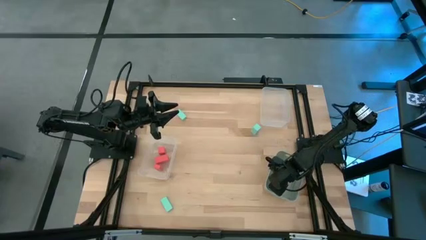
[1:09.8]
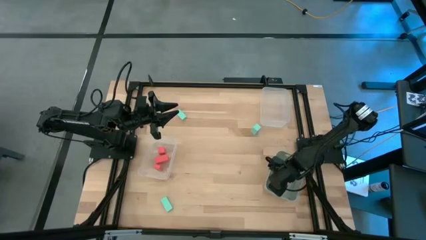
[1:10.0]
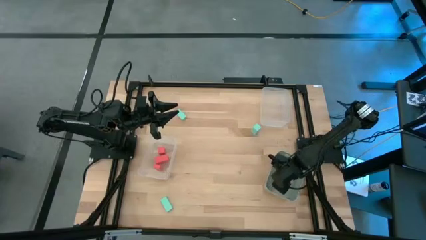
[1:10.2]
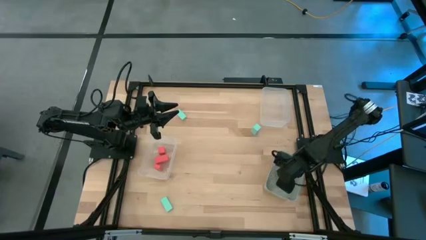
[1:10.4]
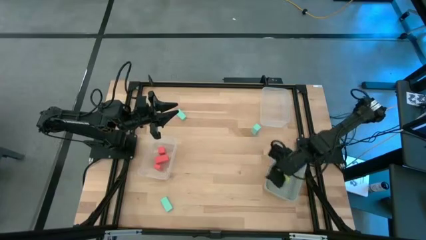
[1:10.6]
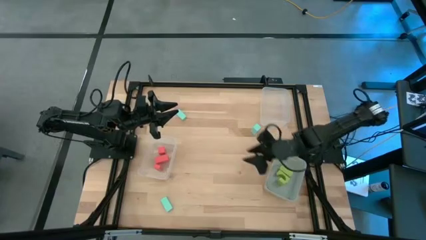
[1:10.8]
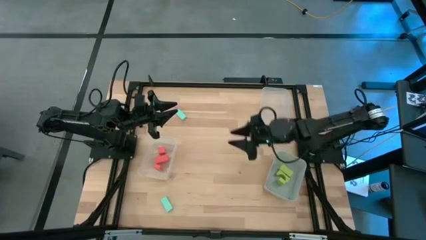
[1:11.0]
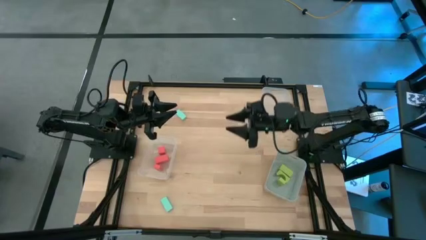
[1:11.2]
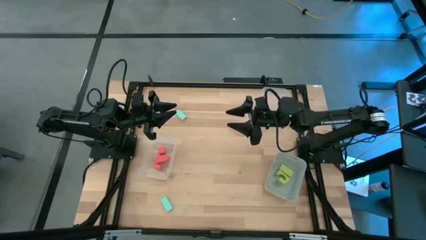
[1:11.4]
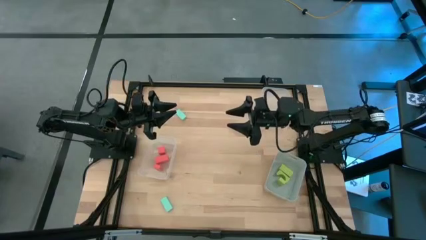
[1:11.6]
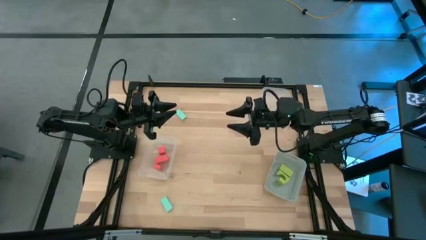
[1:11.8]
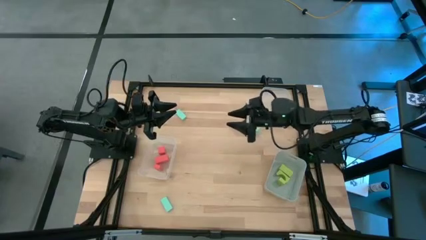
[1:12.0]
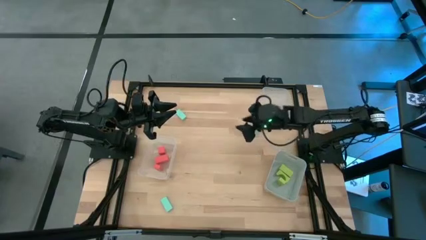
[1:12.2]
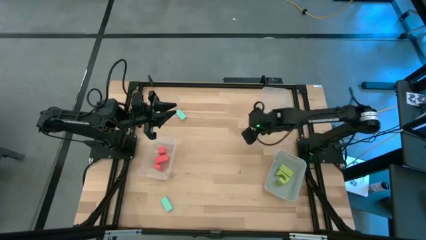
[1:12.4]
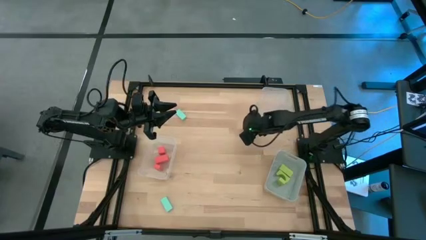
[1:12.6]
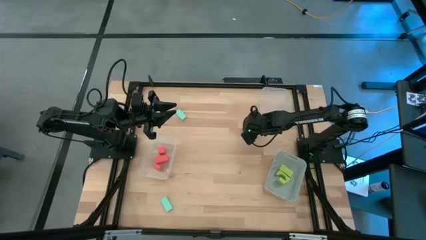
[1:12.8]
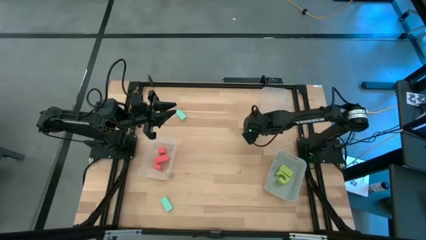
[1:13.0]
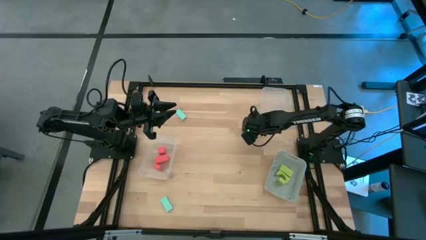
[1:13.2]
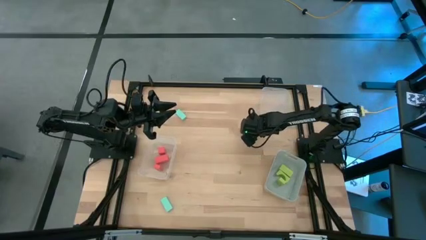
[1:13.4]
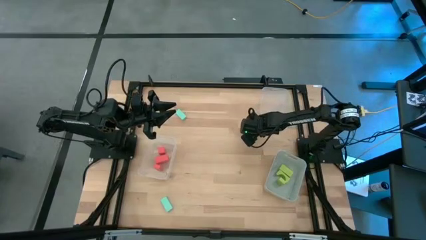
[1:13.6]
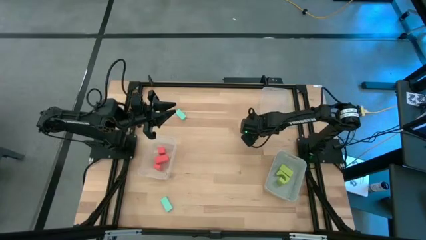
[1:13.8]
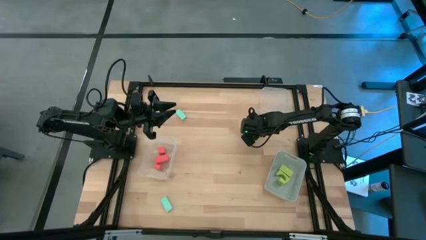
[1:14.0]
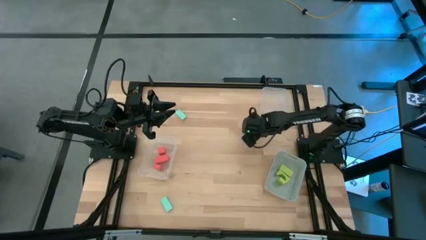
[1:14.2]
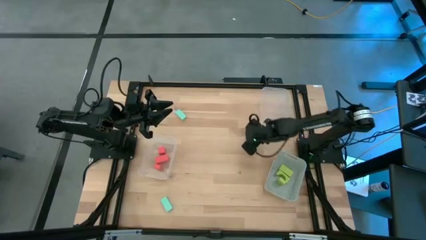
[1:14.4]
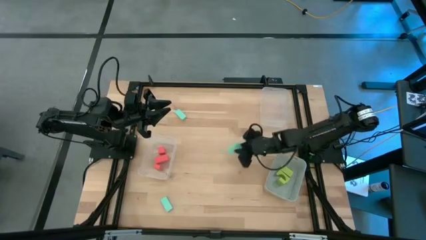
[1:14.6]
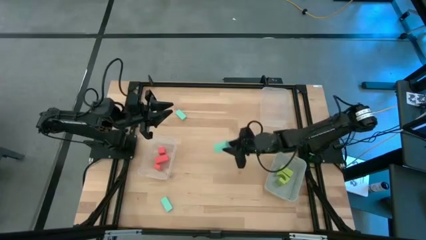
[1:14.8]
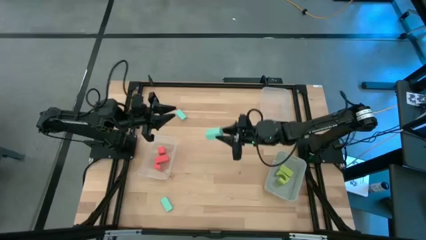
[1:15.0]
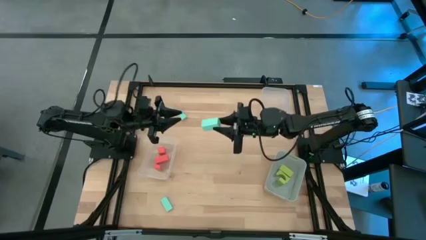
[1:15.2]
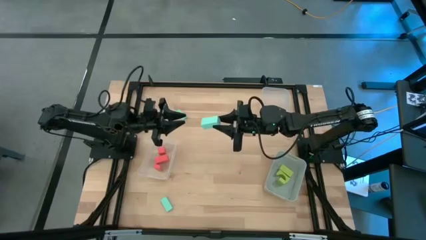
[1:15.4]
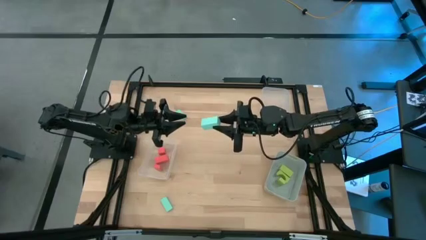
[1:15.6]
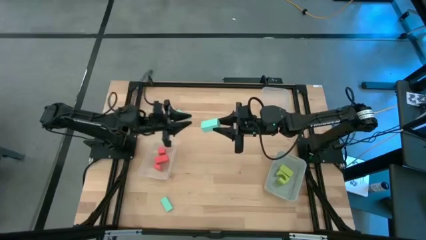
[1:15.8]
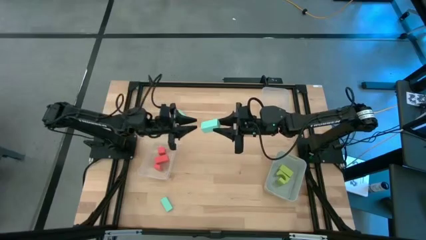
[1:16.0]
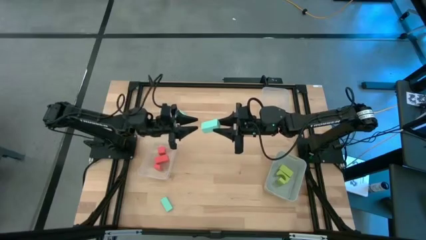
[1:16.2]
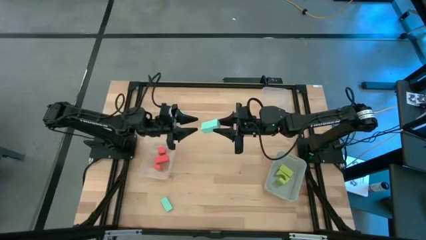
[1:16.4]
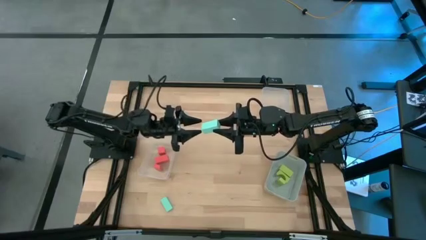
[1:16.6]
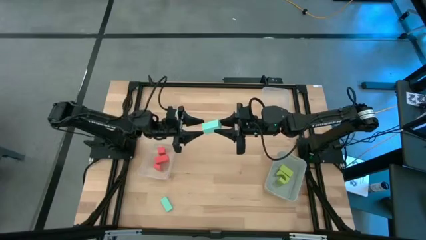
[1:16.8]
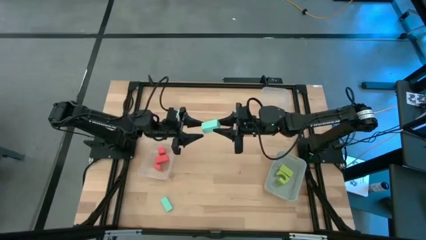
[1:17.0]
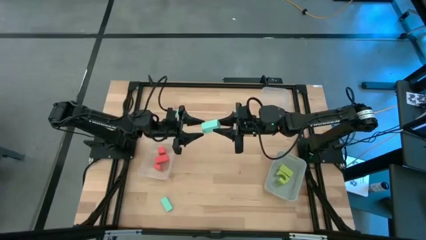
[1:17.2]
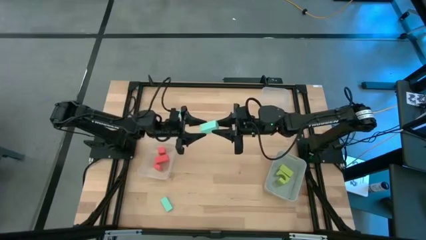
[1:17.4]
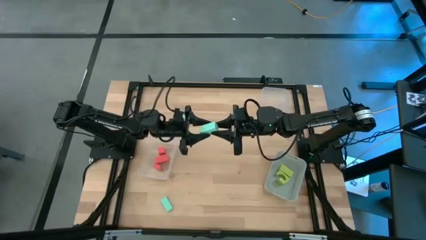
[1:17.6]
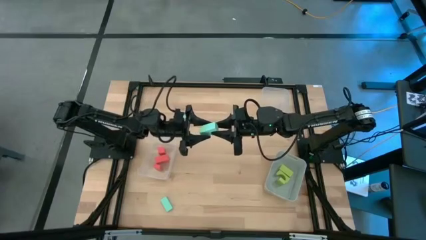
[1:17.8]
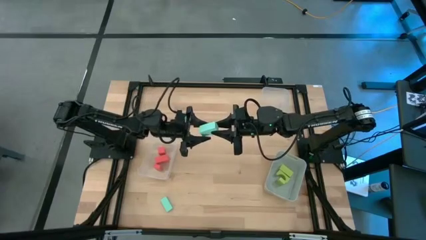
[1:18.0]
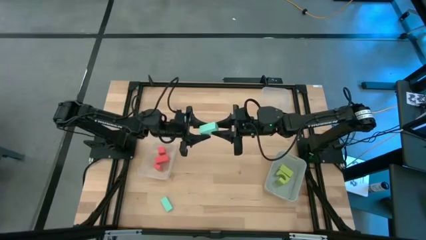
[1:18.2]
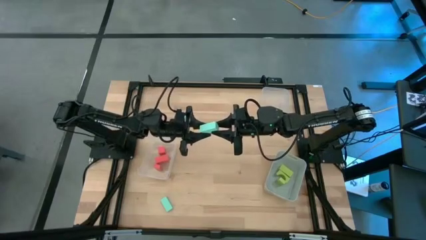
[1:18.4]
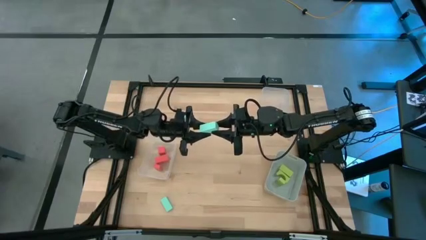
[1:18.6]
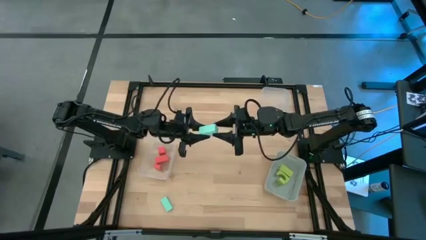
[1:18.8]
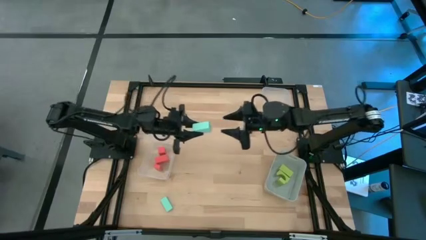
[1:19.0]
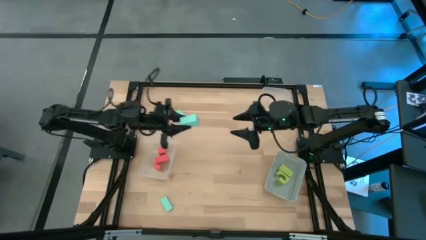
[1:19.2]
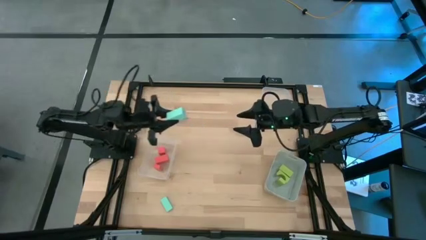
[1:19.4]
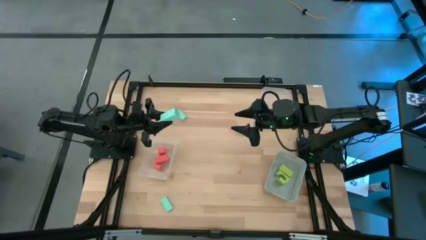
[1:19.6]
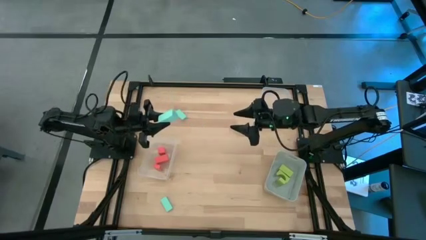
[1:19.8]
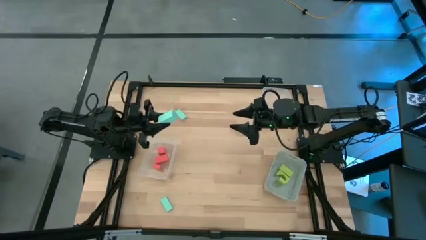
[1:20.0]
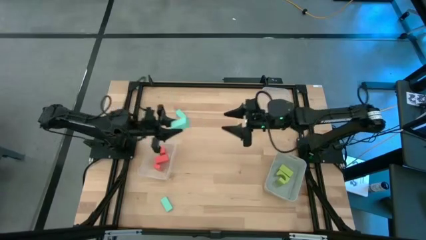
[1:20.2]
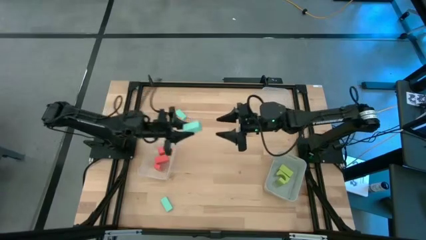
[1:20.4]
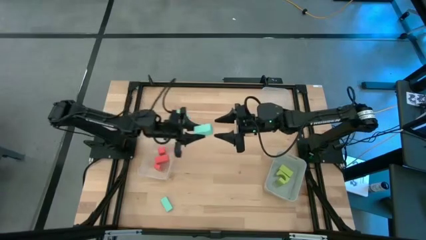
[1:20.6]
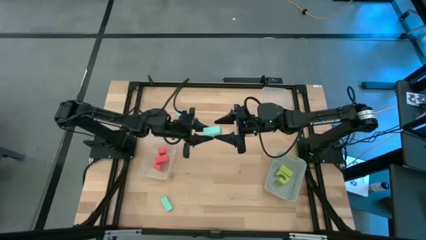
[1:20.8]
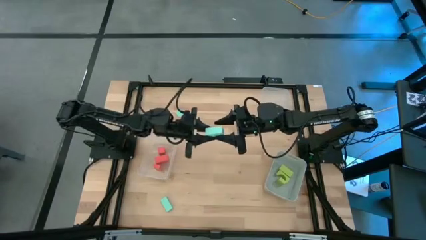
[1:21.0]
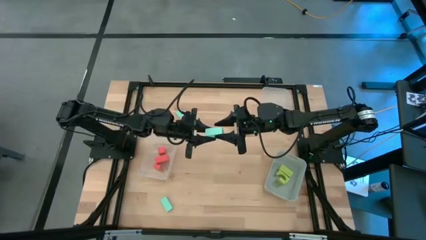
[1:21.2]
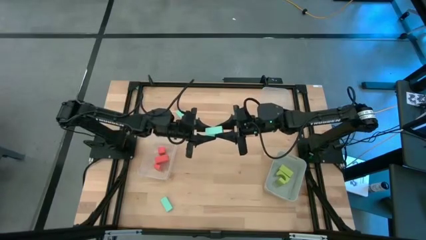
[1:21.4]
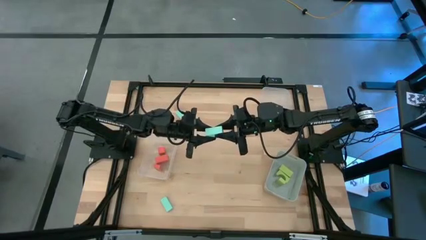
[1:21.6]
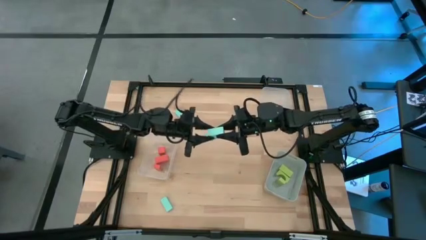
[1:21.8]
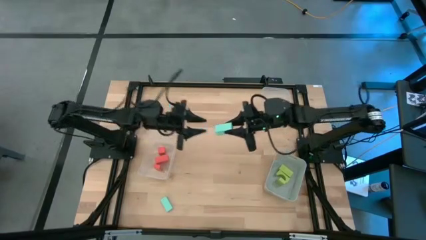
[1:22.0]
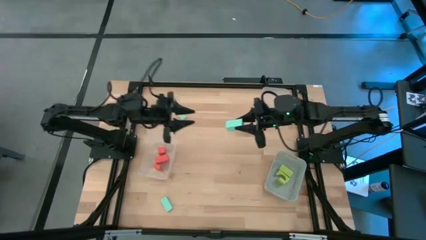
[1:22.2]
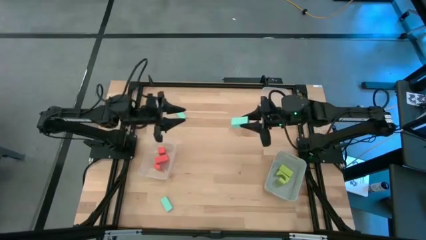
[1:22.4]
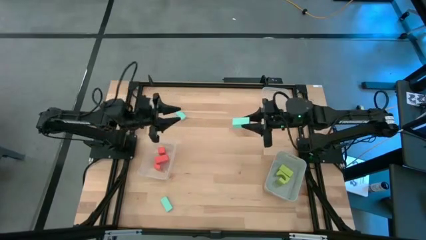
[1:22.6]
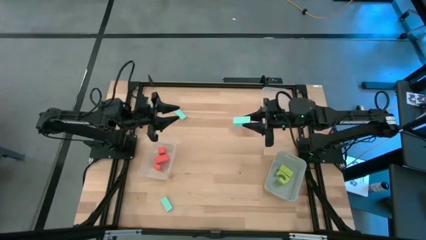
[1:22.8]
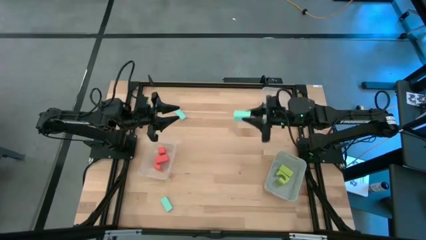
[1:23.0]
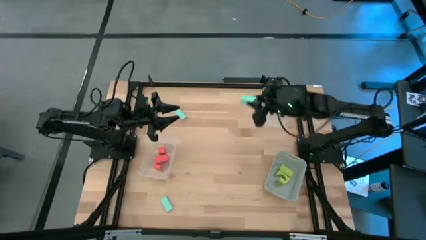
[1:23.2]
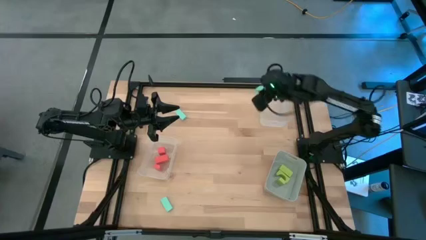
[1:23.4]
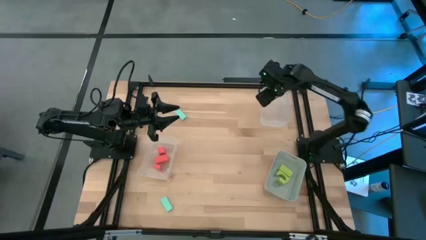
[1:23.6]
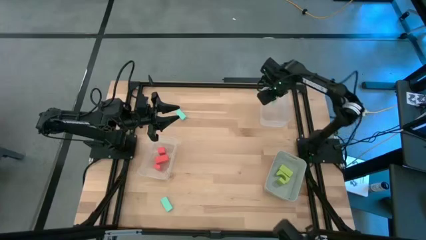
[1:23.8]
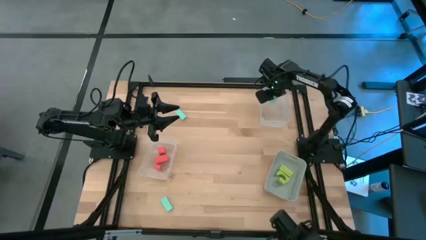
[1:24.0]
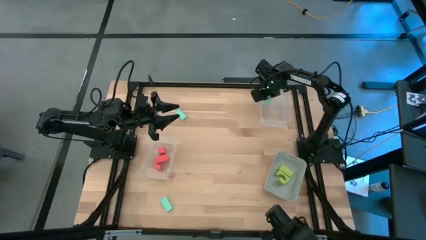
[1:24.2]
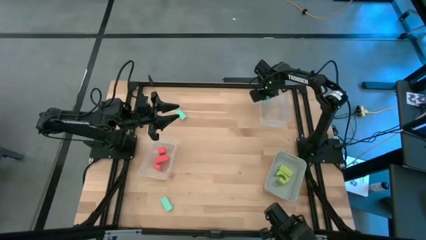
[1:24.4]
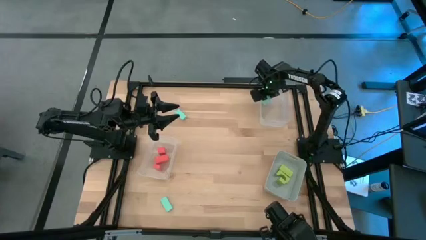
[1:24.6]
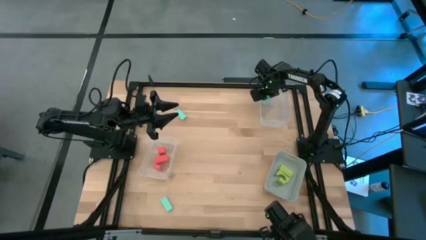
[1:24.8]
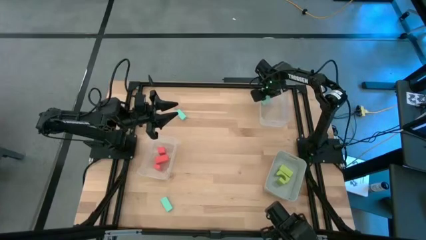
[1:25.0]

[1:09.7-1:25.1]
Task: Sort & place blocks by color
Put the top right light blue block into the top transparent bin

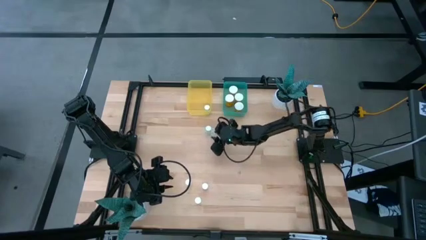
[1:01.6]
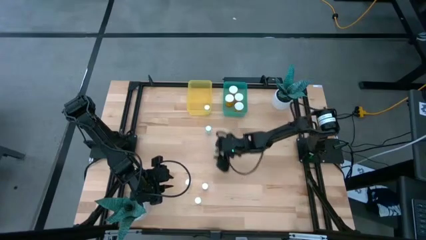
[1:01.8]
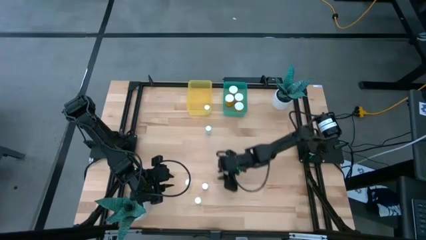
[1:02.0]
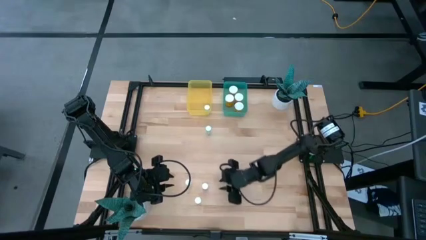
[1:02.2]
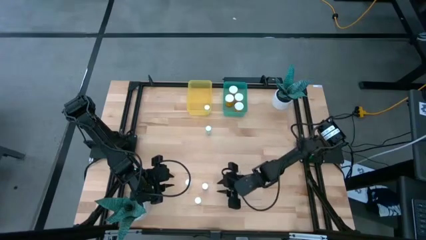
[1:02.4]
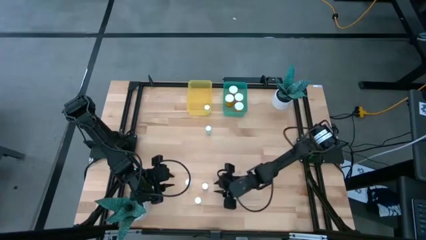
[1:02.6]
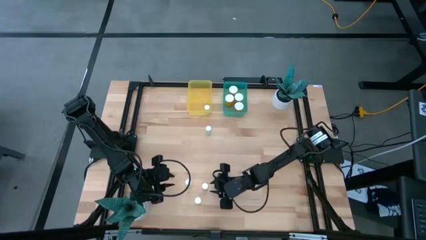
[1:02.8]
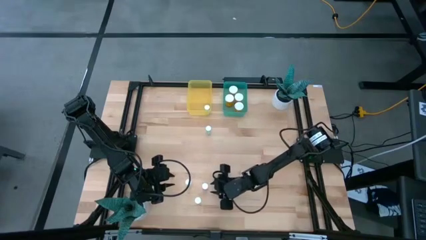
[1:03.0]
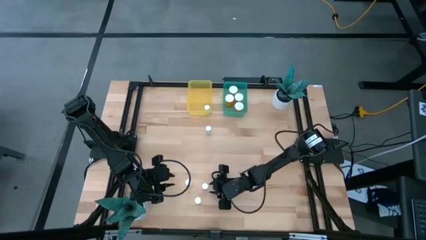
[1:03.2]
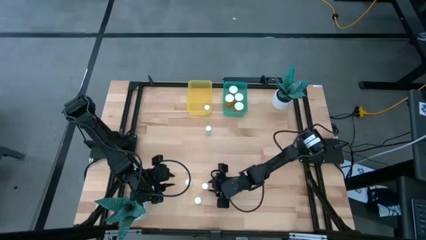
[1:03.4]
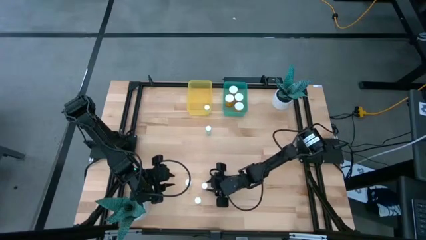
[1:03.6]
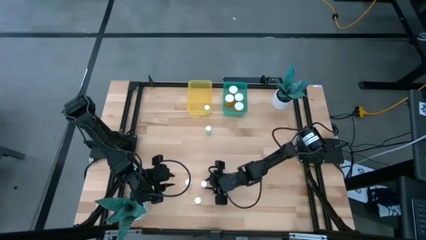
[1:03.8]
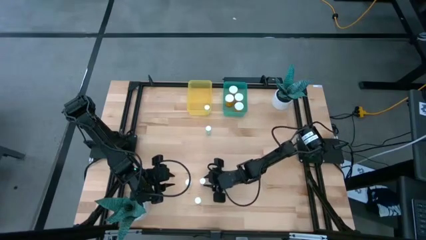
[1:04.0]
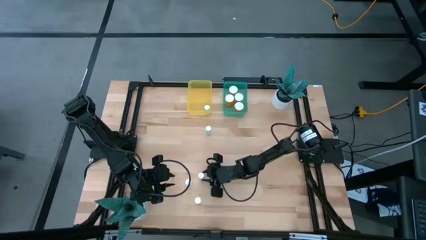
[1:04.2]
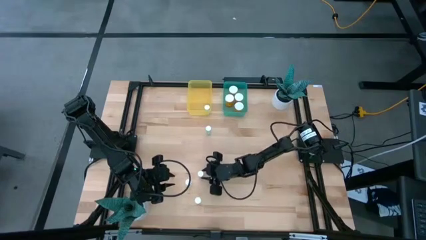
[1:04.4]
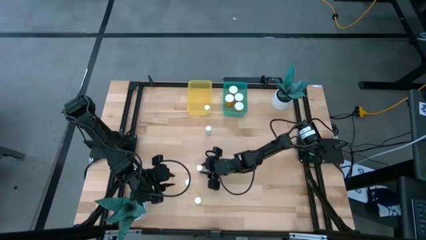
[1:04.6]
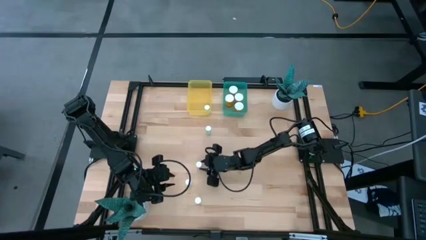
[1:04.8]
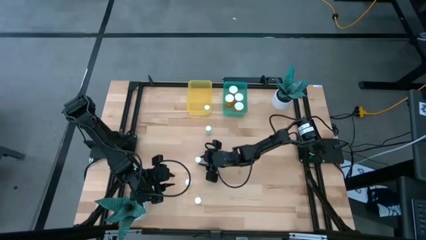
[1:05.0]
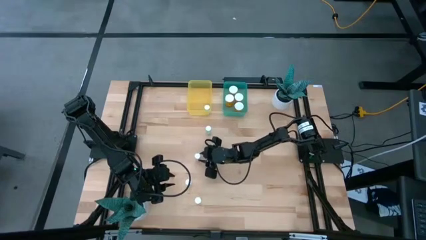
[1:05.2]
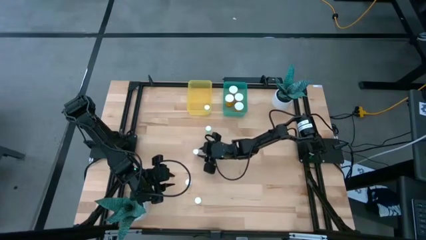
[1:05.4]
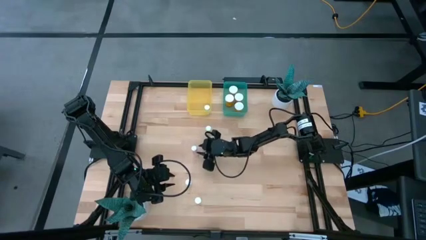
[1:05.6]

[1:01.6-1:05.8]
Task: Pick and place medicine bottles into bin by pill shape (circle, oval)
Put the pink tablet bottle into the yellow bin
